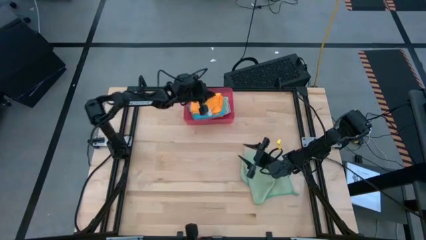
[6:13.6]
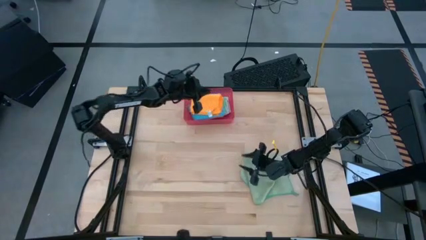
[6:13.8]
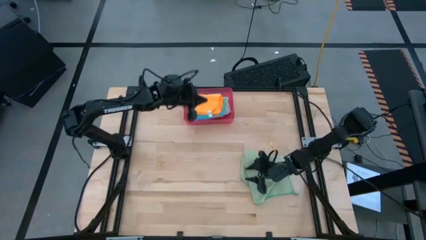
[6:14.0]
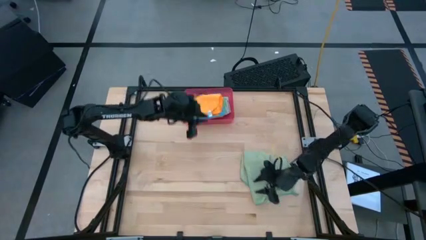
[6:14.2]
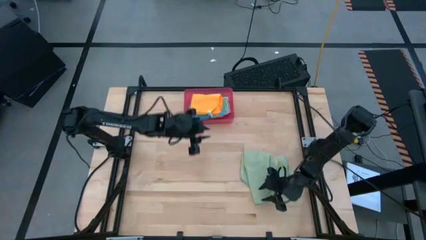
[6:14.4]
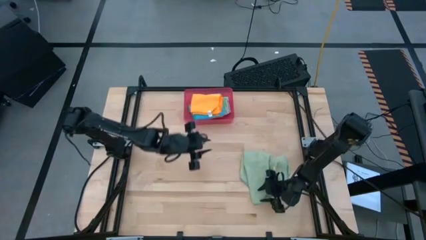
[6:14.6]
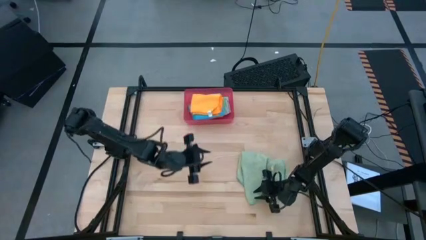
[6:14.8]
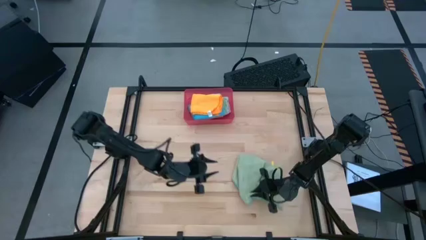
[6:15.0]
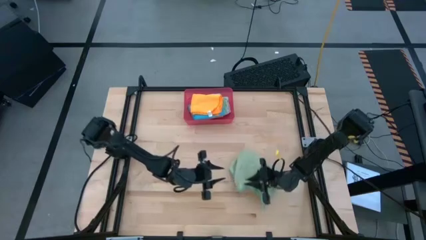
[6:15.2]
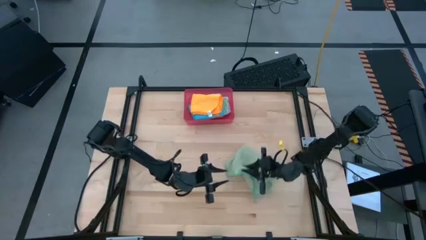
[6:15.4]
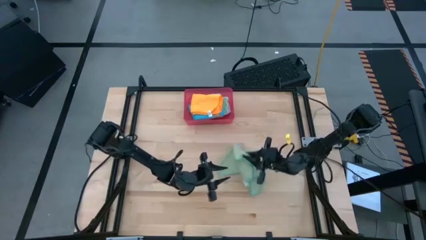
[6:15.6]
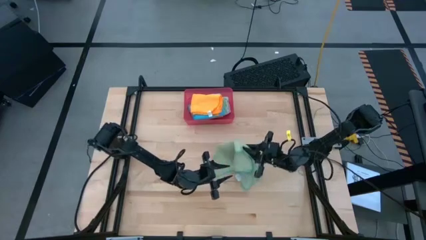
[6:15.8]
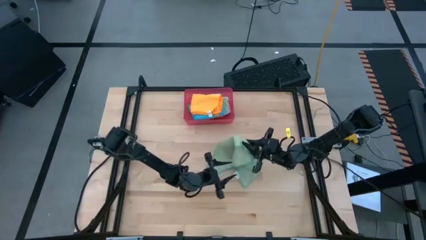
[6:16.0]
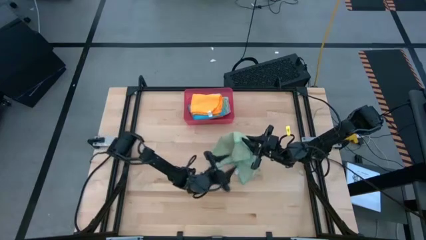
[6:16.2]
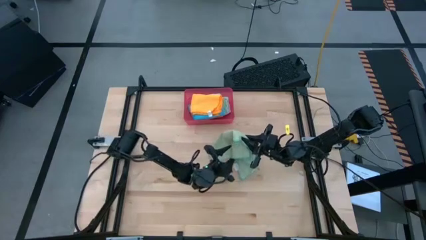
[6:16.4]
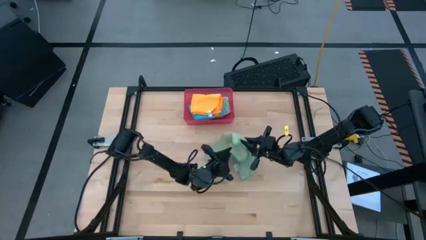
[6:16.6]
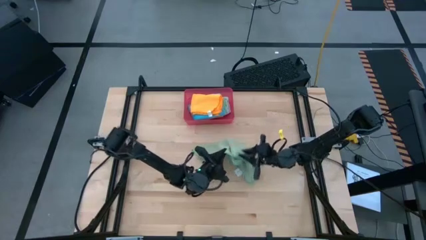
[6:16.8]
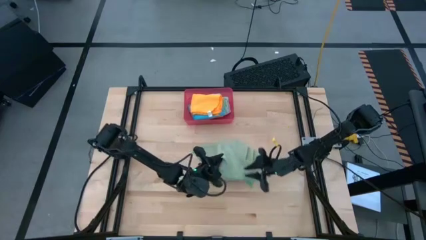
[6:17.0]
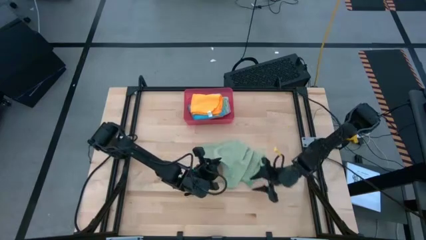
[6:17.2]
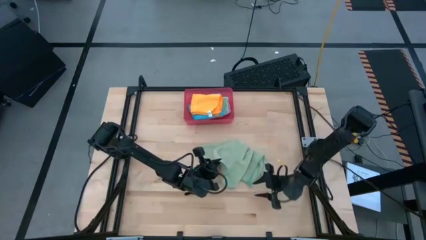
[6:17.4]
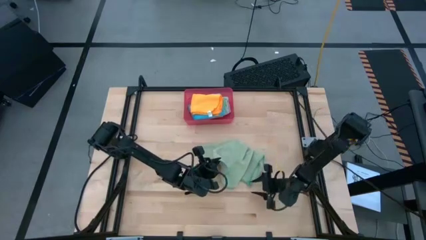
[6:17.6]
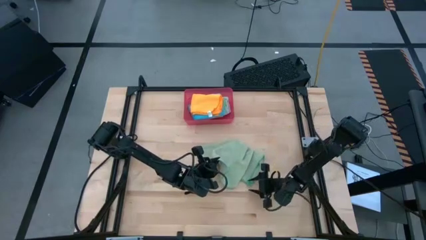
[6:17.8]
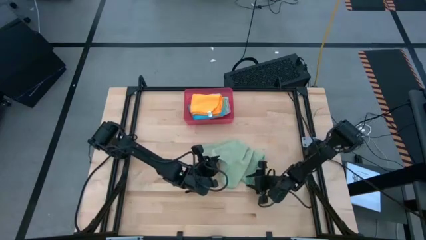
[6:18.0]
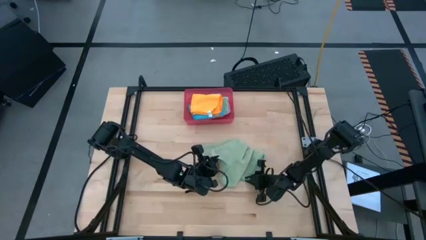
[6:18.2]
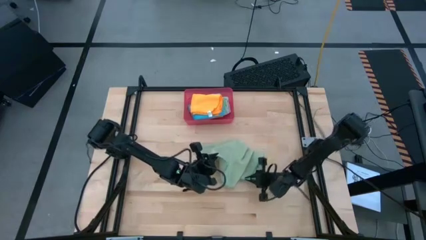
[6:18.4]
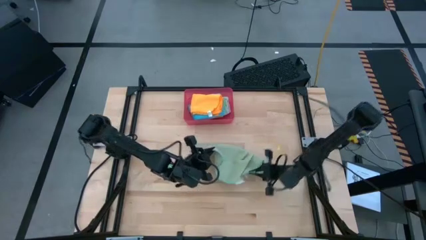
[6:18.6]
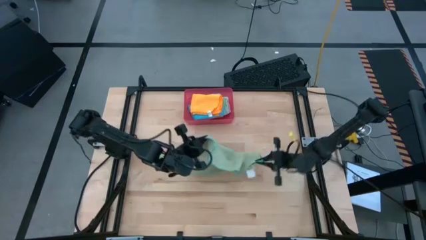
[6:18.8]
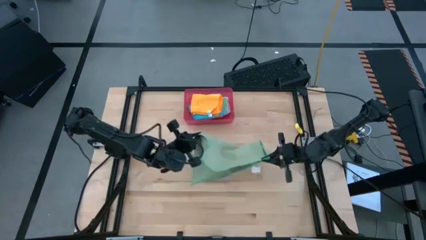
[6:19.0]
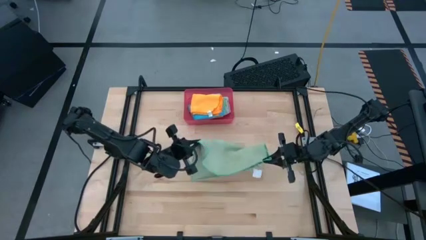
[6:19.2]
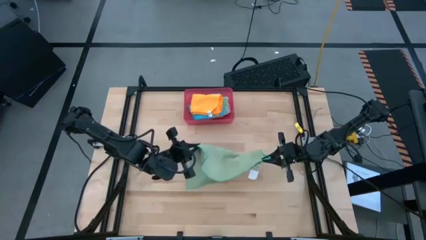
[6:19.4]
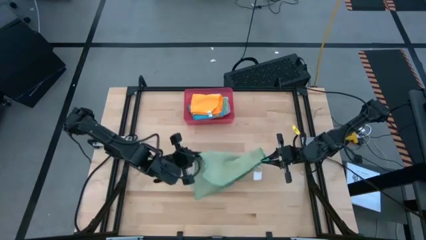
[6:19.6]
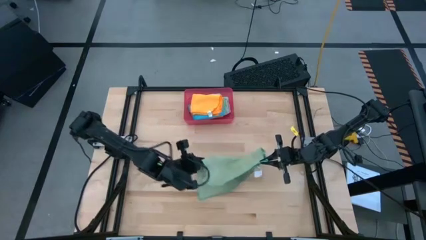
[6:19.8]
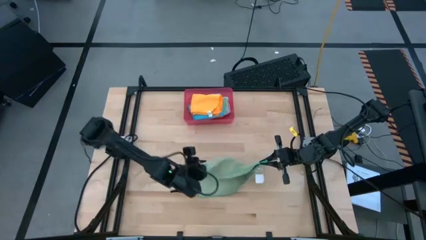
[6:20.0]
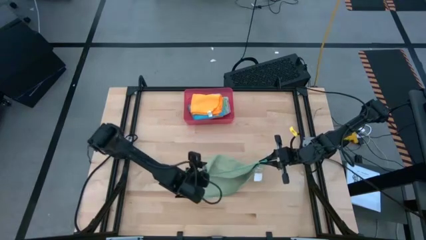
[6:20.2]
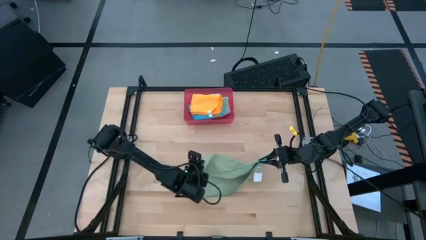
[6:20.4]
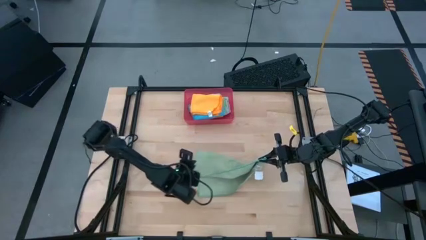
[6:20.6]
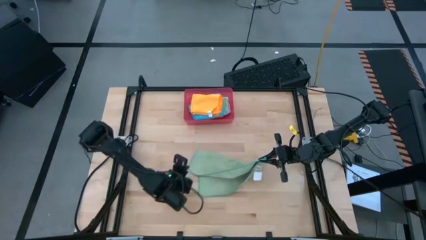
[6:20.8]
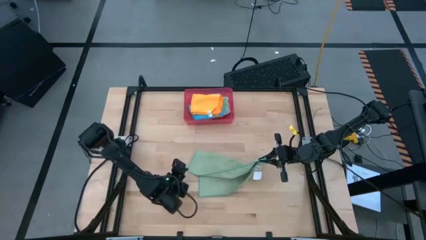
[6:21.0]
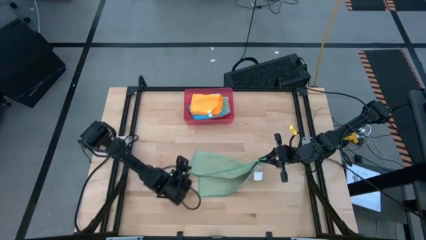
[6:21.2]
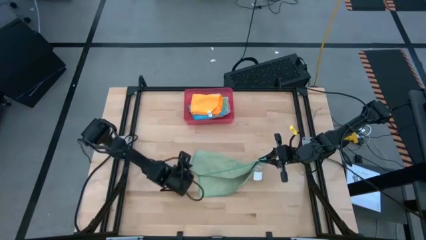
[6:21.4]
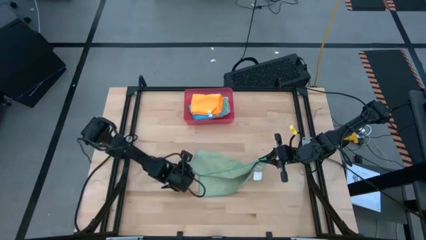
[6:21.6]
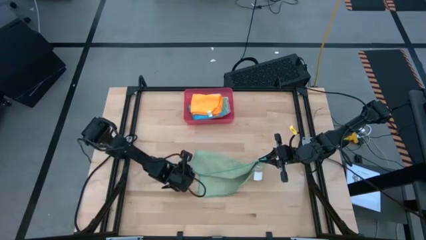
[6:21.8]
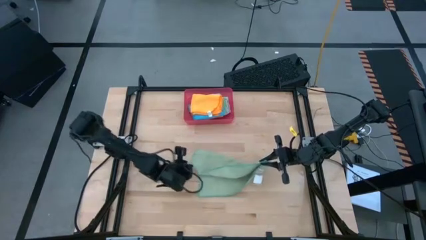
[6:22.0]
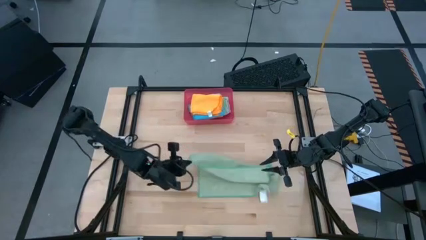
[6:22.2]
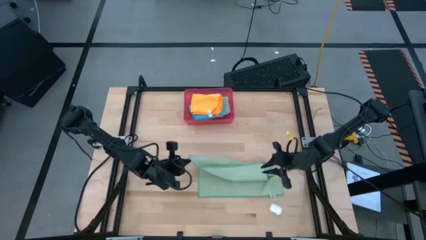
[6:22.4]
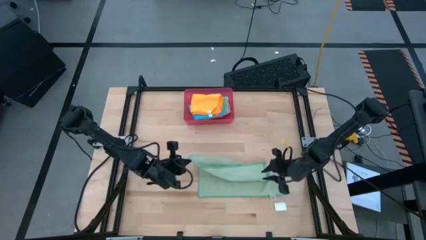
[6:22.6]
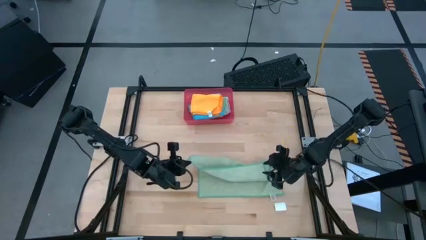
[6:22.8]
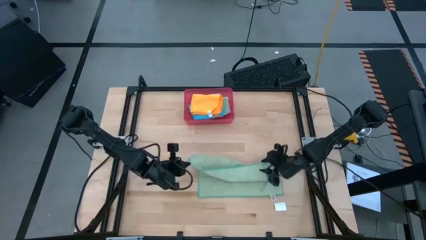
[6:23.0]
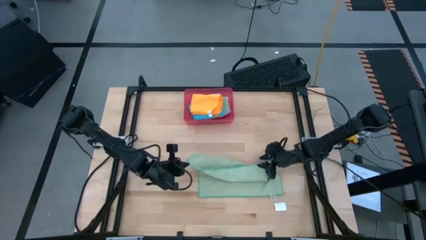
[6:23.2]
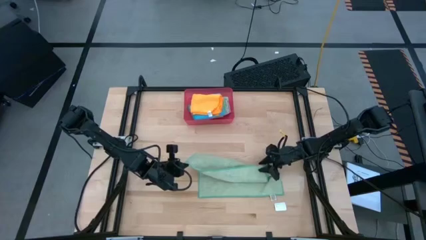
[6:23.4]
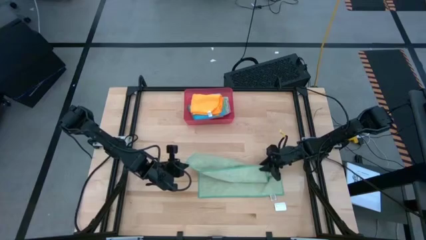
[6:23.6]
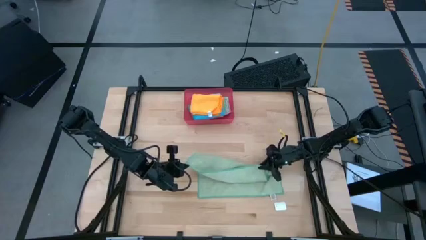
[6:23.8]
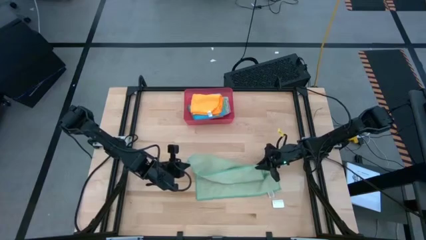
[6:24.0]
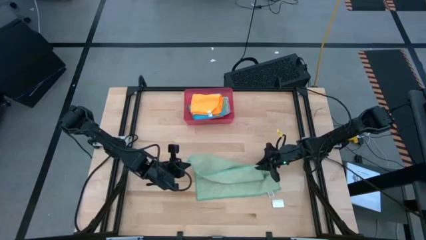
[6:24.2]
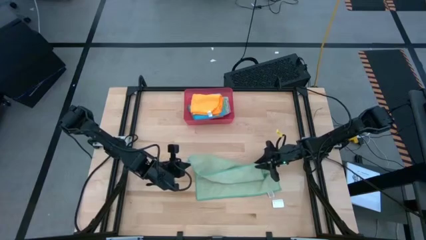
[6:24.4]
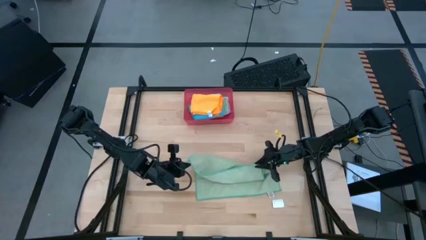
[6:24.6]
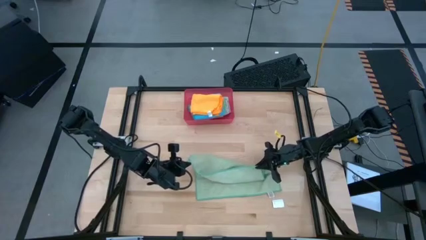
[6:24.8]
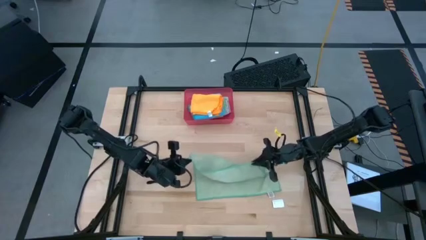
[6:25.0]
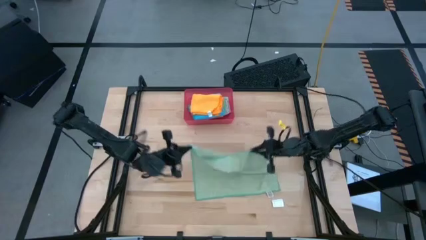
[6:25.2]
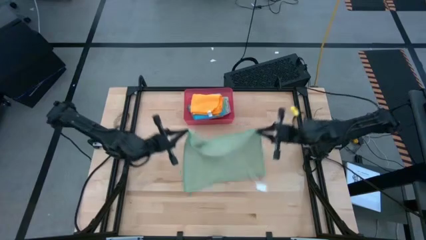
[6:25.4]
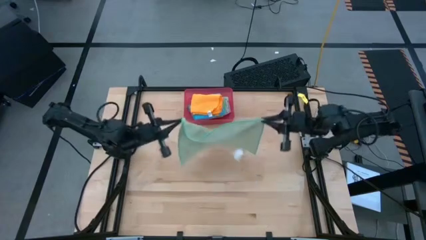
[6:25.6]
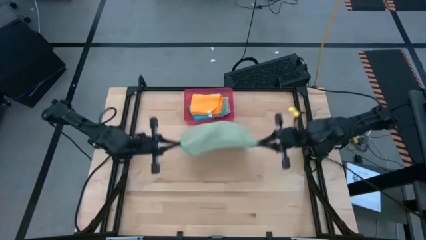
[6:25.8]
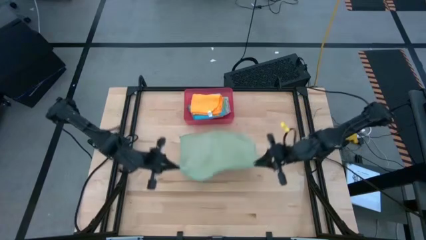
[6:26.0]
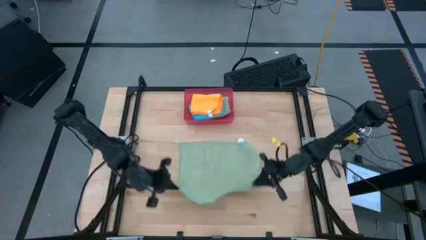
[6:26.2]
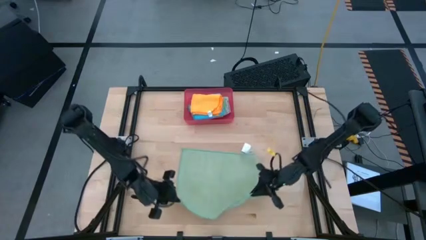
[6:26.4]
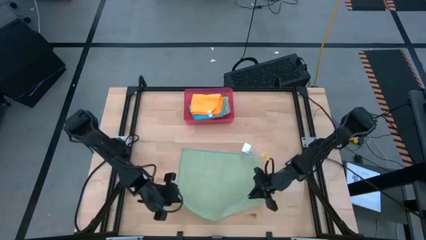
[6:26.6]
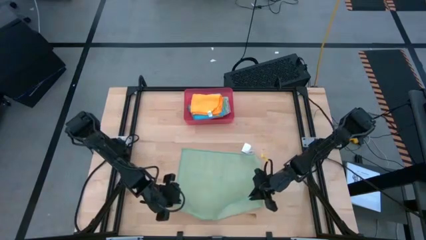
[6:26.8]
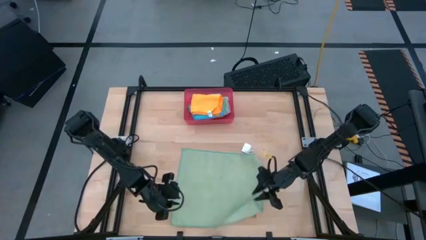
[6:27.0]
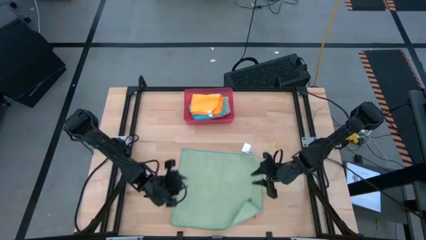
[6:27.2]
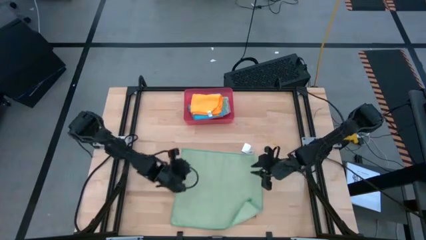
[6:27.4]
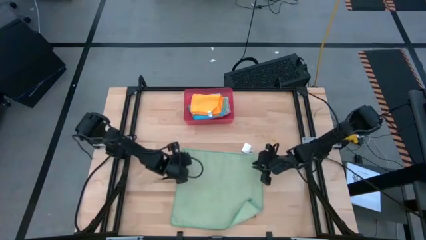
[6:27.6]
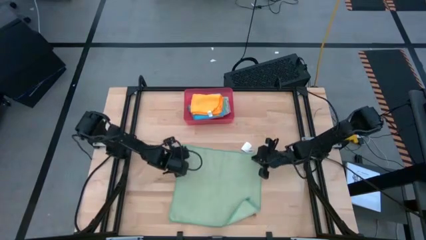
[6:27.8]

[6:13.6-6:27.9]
Task: Fold microfiber towels
Fold the light green towel

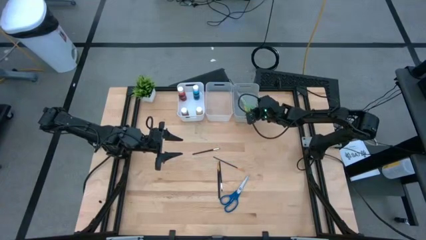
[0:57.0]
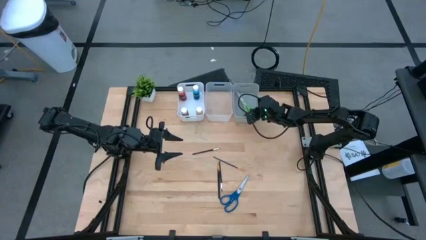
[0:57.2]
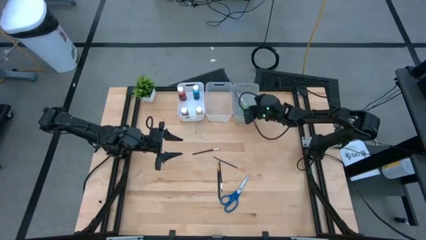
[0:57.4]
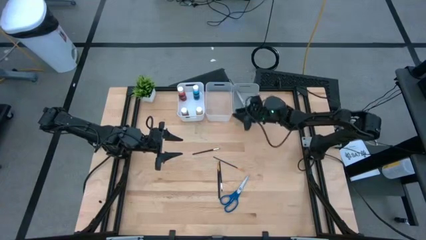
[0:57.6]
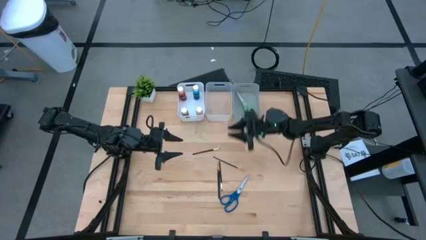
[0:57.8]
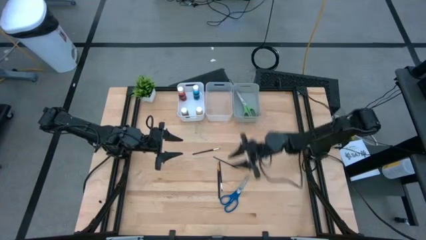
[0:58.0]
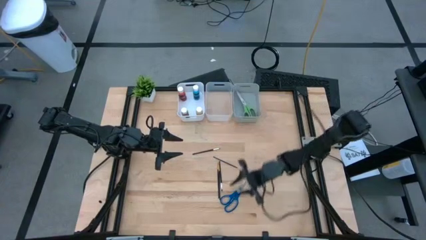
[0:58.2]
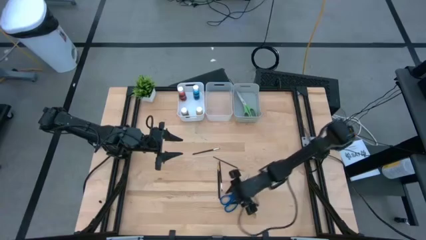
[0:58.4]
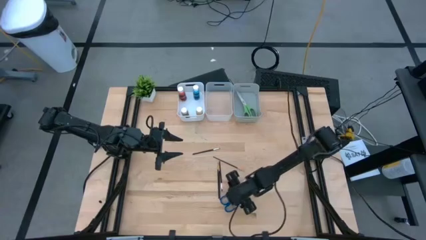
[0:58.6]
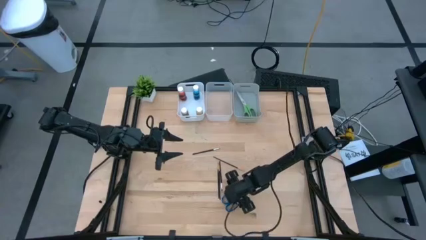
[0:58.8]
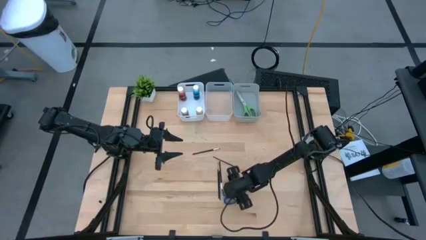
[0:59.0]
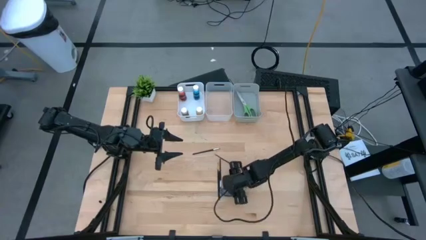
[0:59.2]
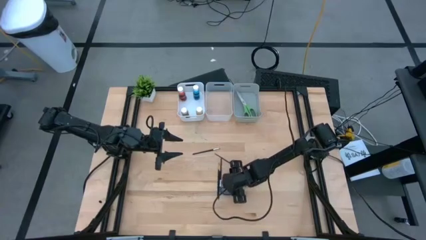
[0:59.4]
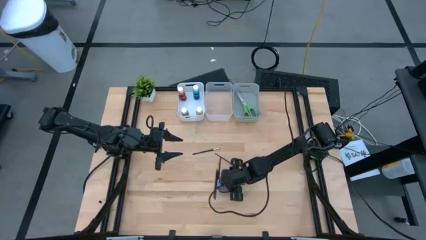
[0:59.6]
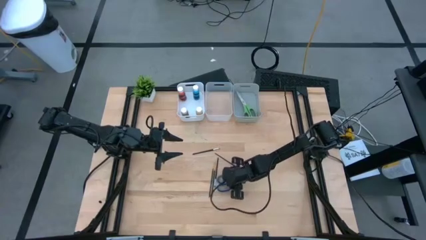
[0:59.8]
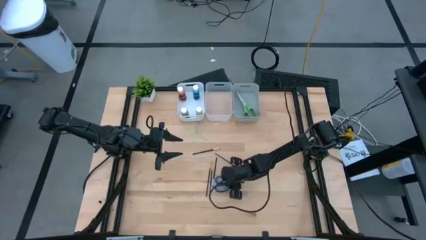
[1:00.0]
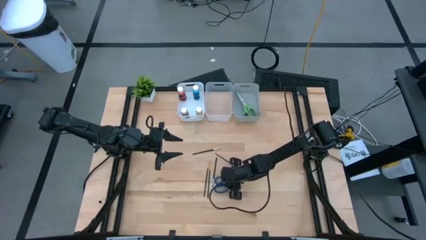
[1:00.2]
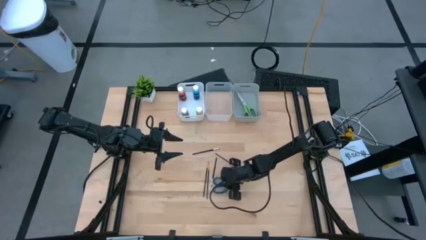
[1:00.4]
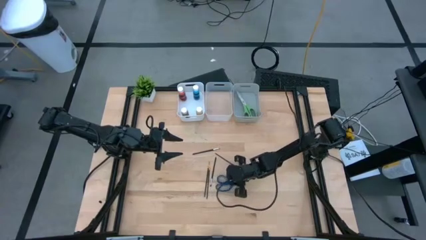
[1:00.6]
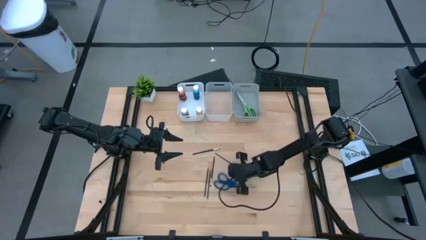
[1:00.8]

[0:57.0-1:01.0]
Task: Pick & Place Paint Supplies
Put the blue scissors into the gray bin
